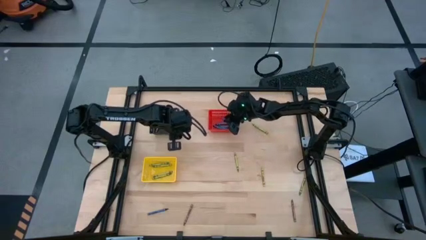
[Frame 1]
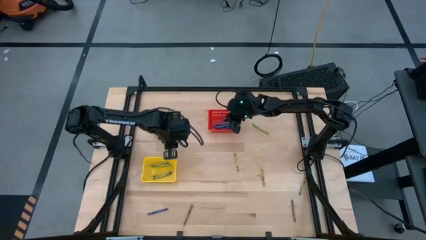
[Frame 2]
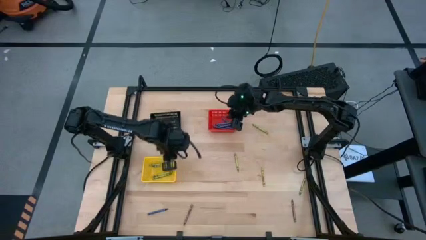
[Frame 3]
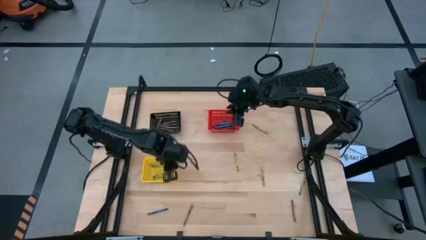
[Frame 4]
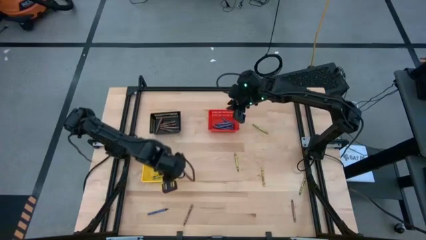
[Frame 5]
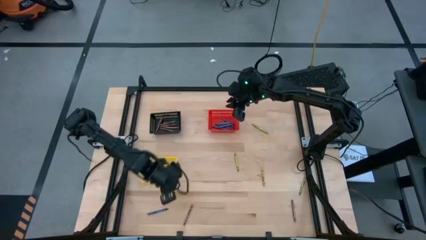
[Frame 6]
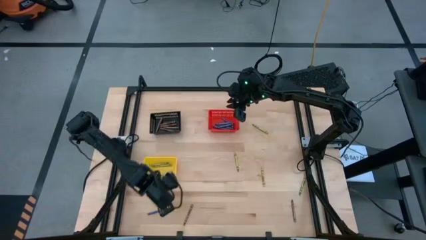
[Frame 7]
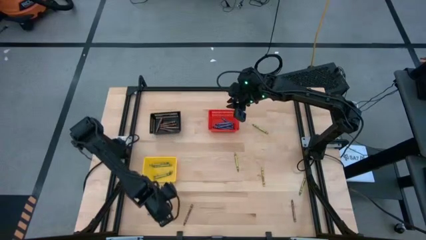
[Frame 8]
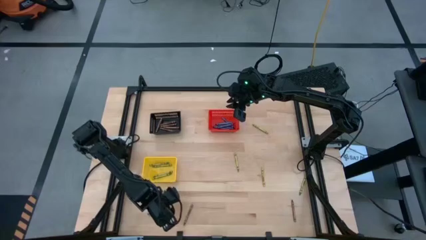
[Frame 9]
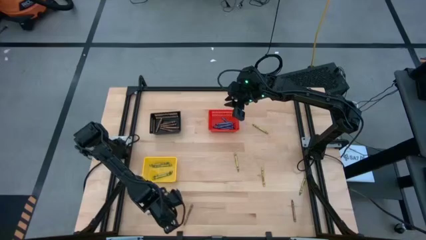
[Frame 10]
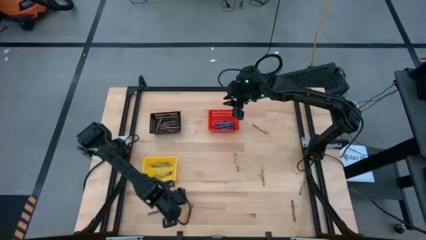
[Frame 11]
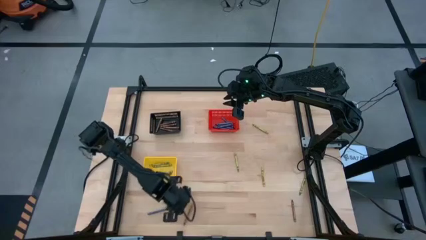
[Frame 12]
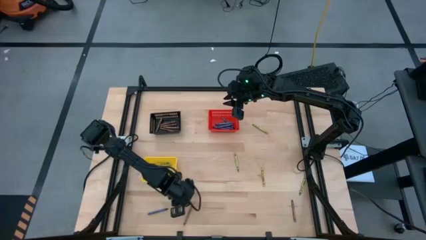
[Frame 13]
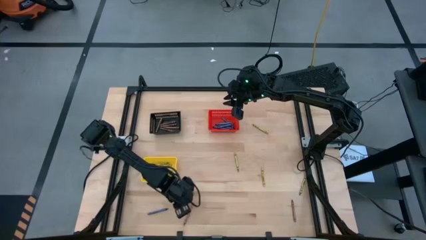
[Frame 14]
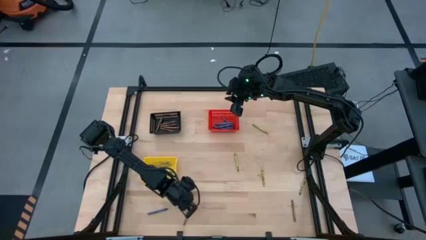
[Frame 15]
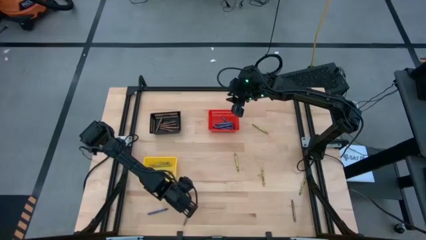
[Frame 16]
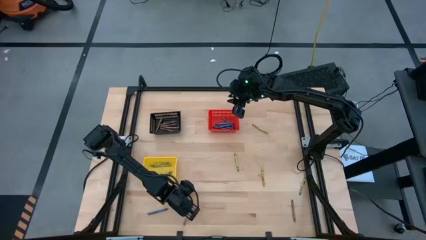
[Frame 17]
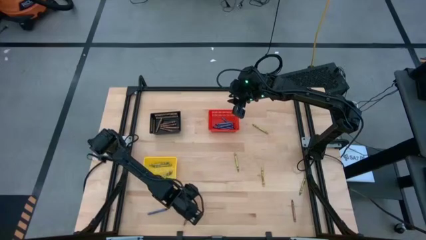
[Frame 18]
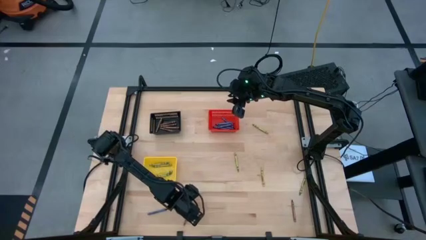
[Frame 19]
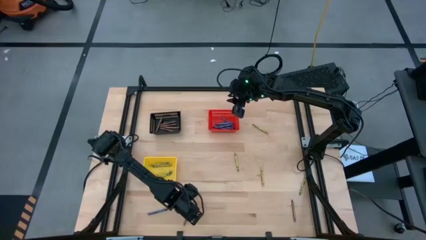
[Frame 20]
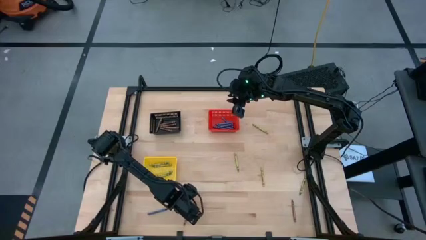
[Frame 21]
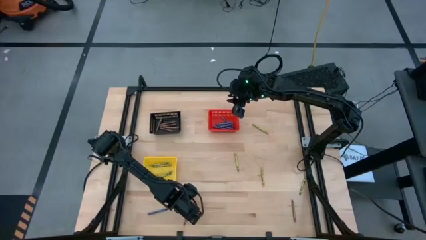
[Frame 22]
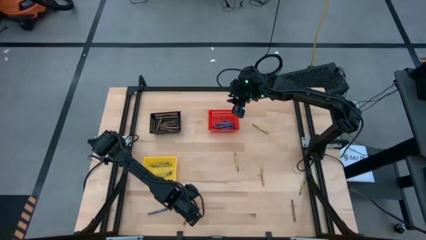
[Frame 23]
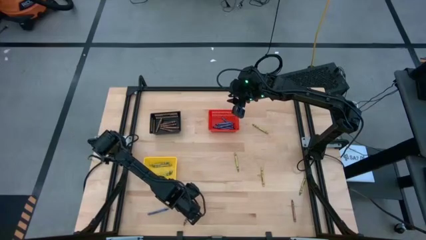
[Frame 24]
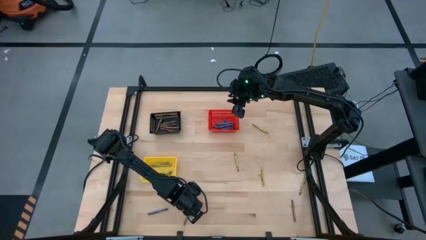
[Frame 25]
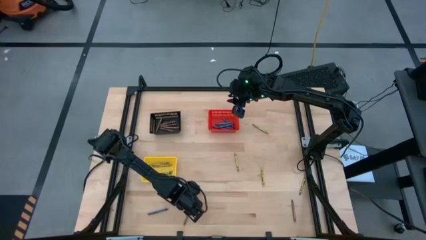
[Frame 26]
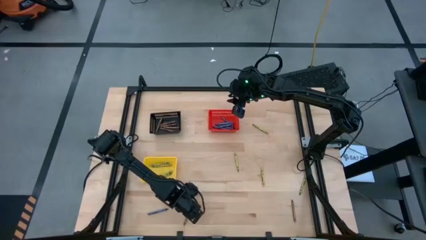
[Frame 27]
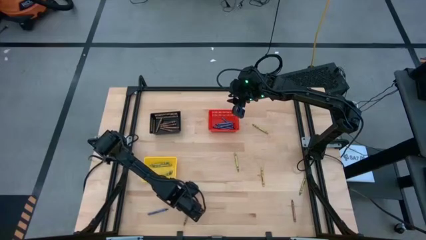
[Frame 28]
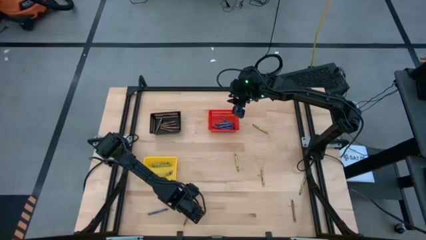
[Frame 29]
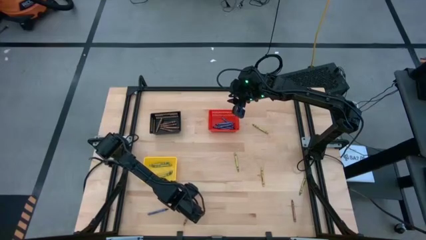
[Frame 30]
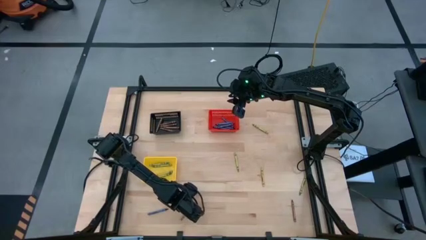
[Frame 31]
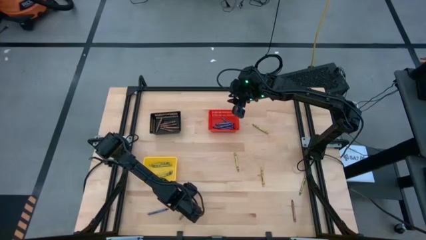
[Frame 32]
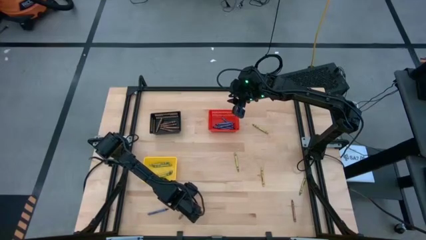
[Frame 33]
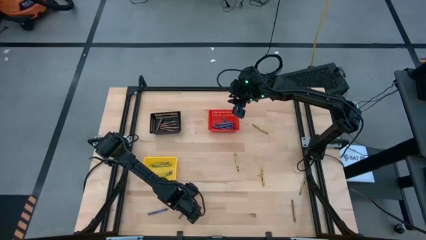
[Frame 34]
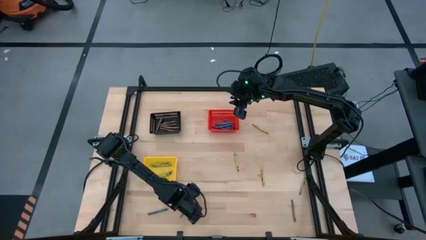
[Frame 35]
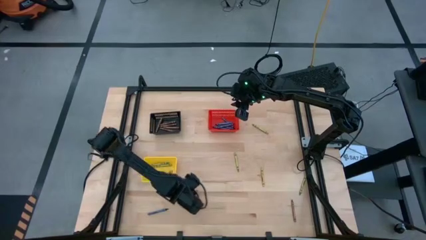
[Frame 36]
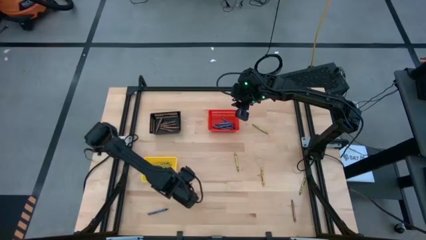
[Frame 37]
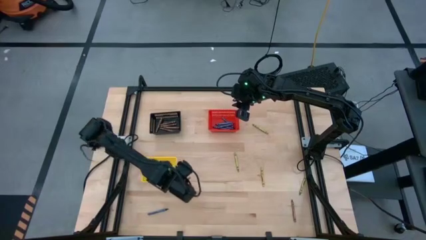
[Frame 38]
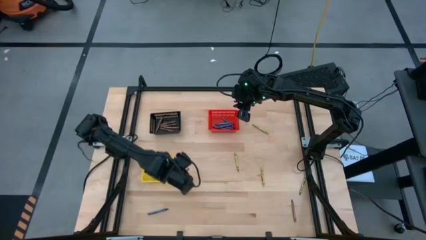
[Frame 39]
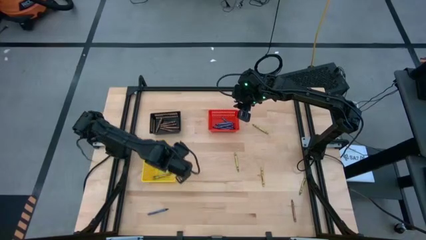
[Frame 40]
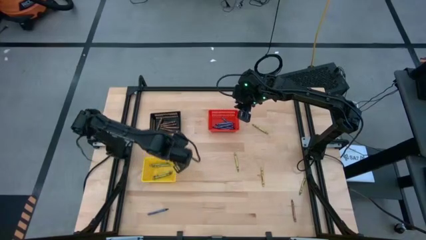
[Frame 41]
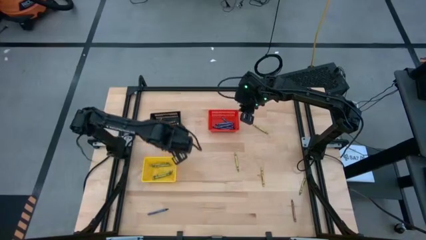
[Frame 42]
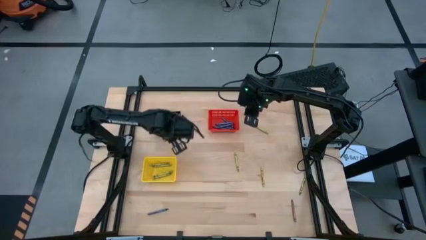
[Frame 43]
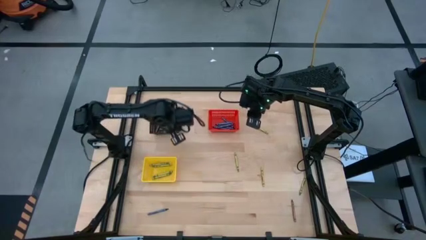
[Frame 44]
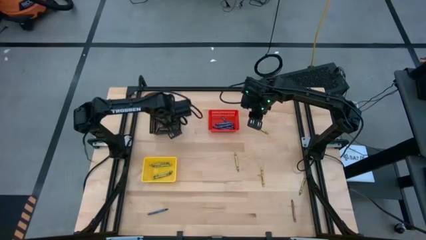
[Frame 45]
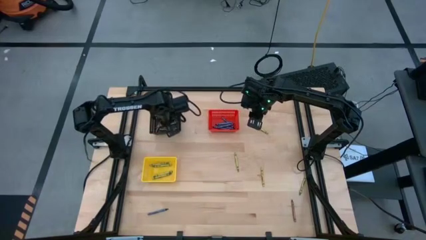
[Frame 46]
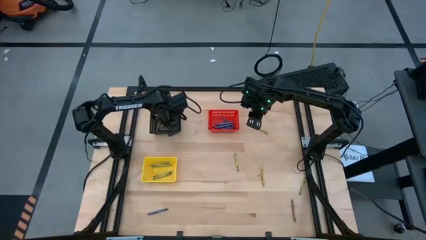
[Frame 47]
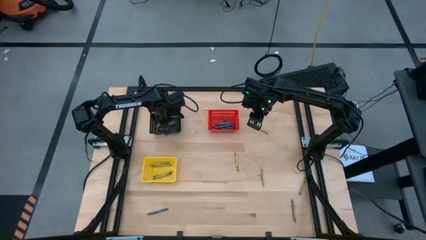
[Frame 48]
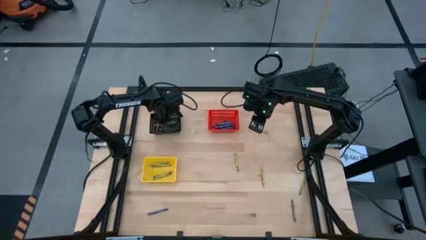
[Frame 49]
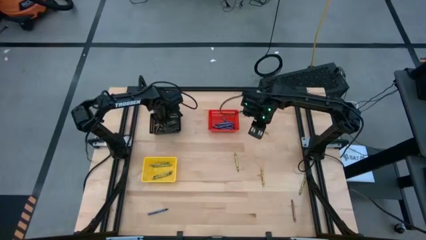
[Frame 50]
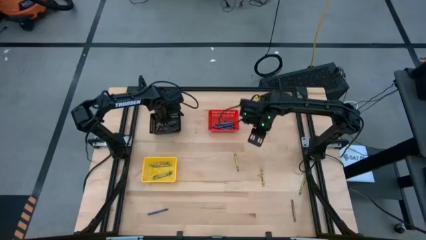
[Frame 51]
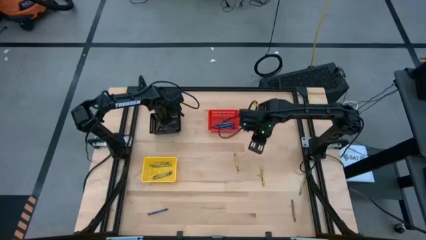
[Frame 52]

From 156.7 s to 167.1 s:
Task: Sort crayons
Put the brown crayon into the black bin

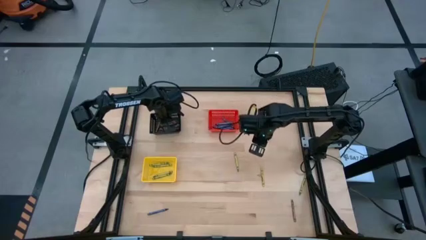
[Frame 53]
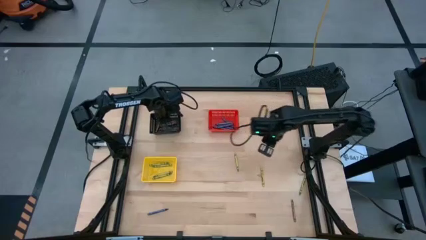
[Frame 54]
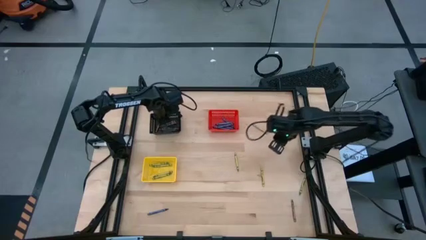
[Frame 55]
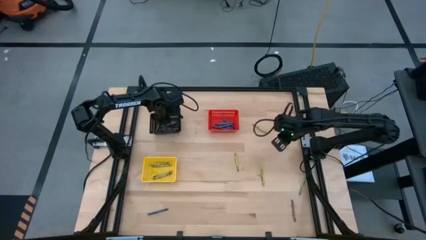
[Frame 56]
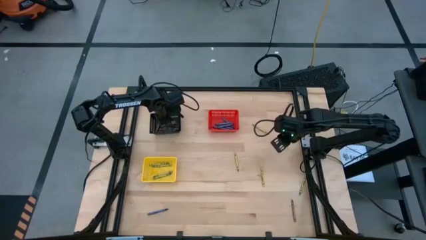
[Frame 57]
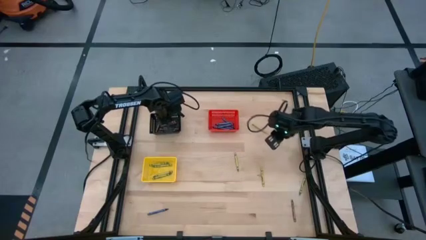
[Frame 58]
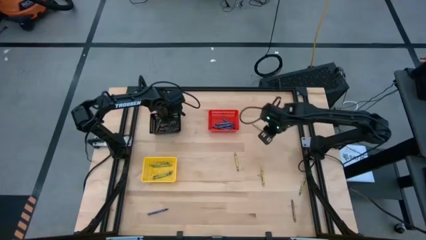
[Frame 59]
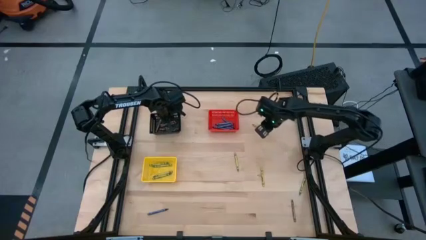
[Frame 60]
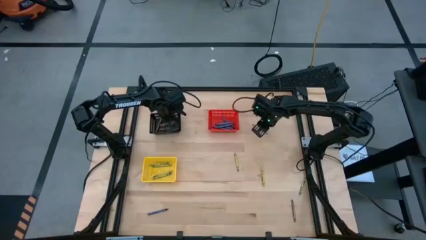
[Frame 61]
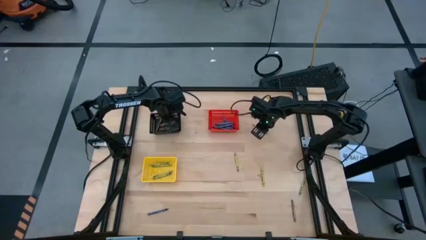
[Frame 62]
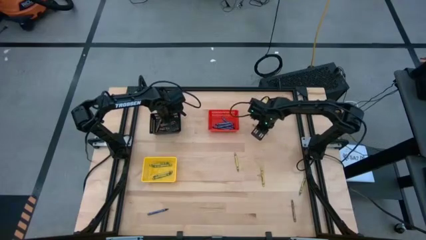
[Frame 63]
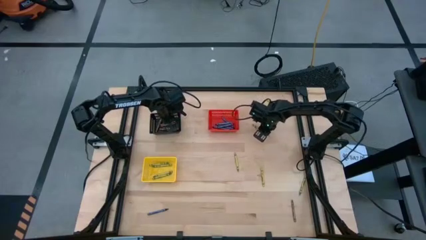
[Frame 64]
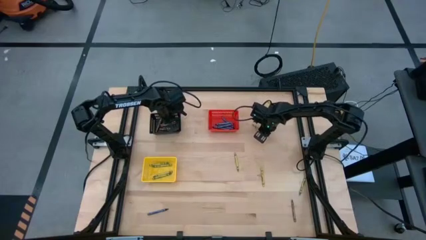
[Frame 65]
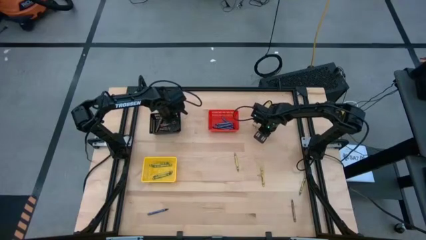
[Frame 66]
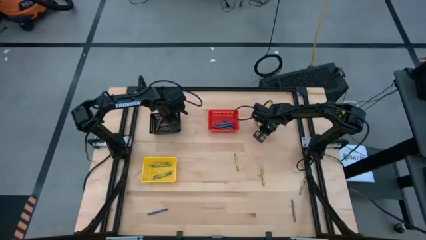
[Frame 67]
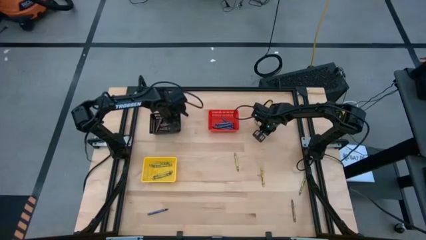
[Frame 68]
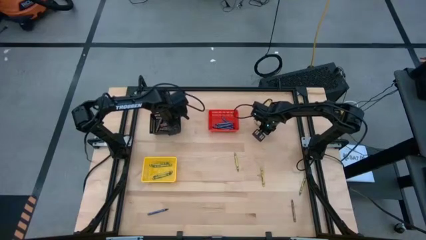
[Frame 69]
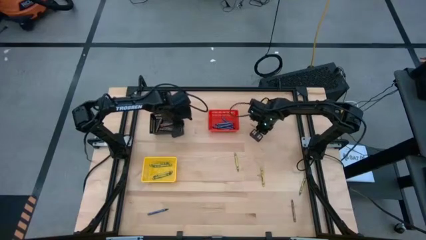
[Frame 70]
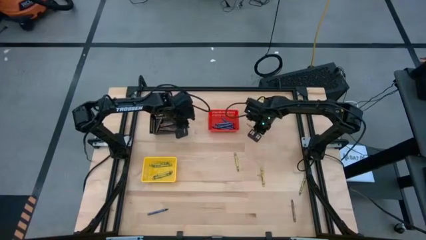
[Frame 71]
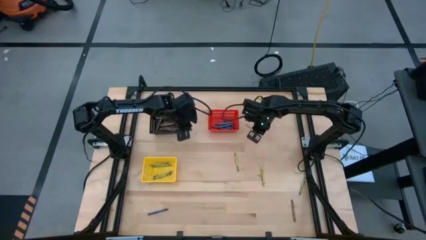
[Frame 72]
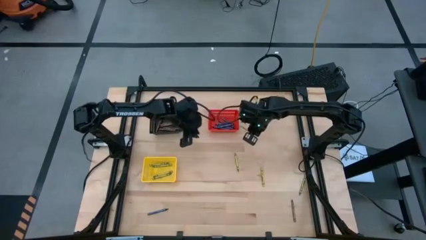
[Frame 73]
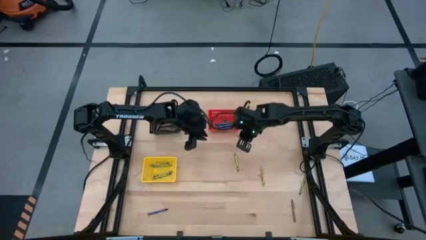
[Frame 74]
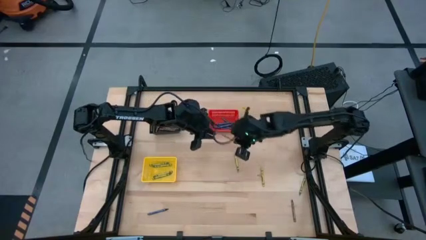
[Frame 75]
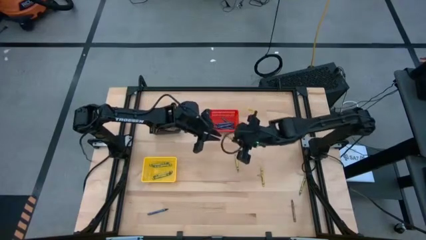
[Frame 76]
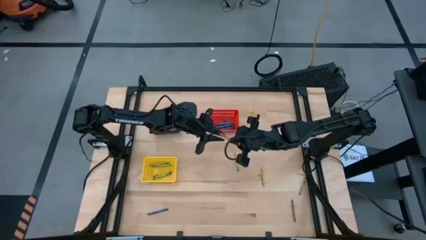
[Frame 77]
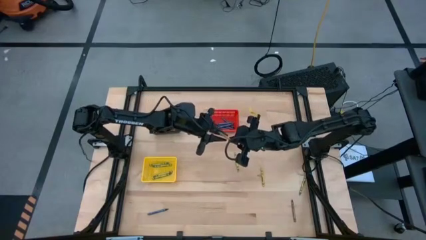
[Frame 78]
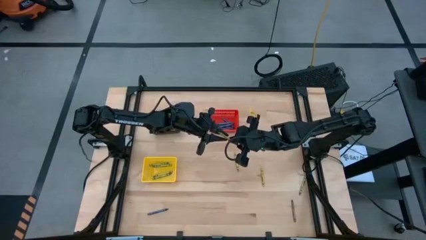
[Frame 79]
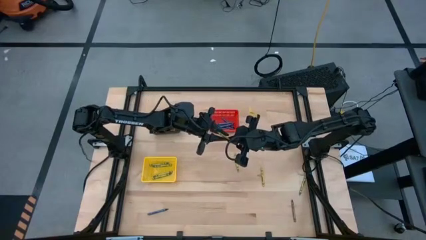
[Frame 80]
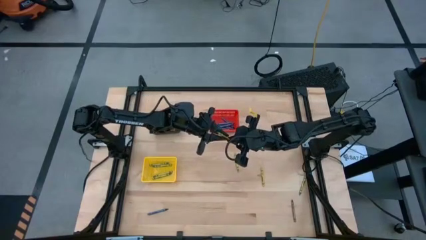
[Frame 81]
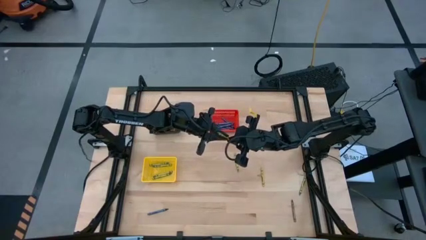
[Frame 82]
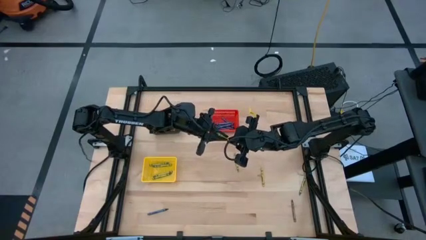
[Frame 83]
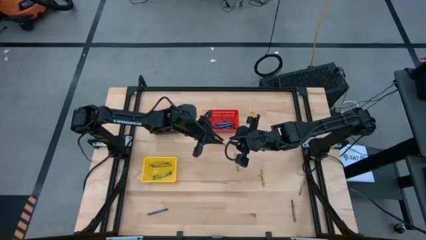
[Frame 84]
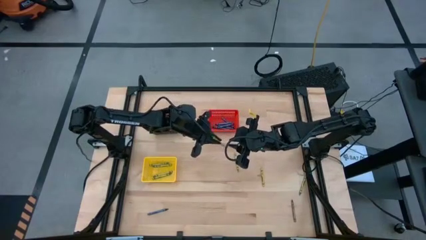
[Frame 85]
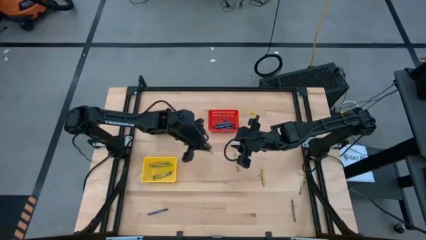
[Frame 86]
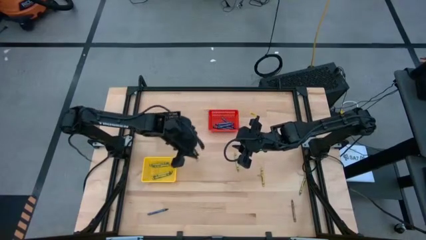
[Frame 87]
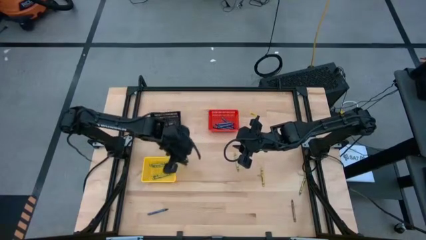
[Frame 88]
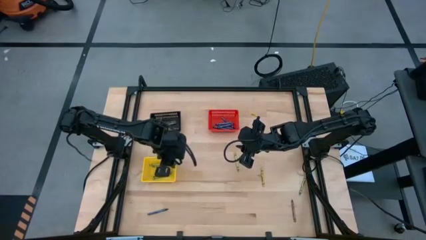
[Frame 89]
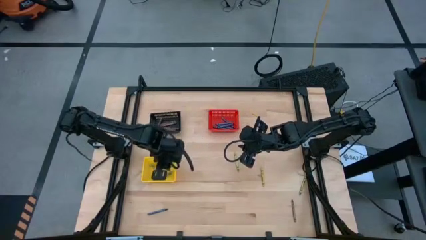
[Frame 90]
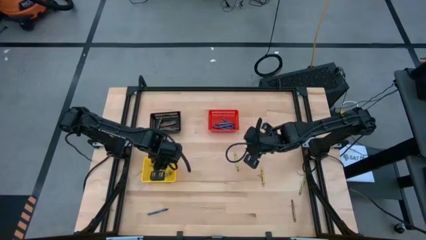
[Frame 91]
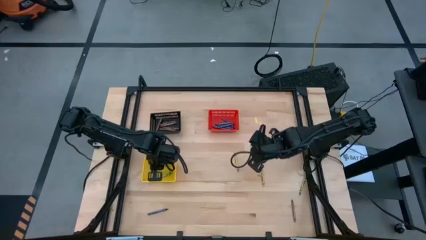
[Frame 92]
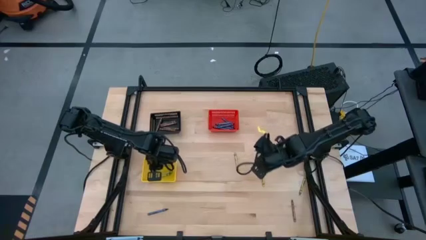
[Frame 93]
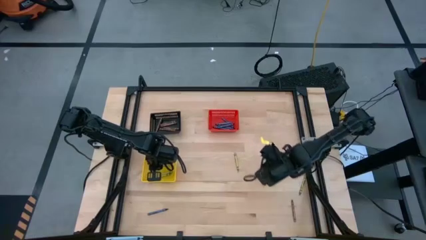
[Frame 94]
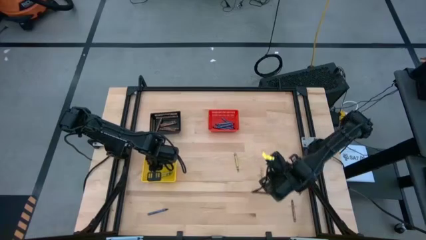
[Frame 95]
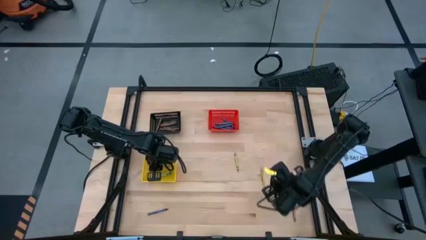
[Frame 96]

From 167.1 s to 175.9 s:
Put the green crayon into the yellow bin
